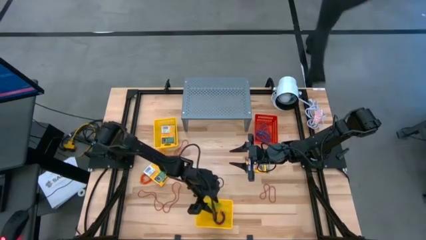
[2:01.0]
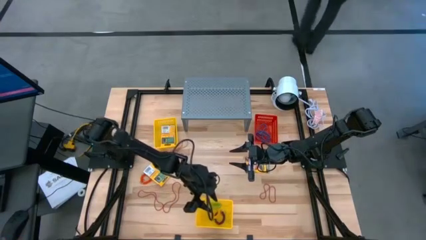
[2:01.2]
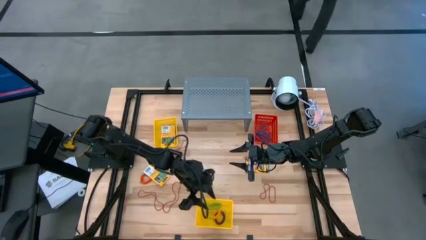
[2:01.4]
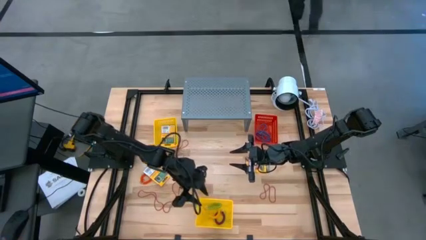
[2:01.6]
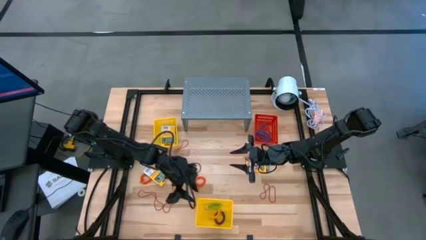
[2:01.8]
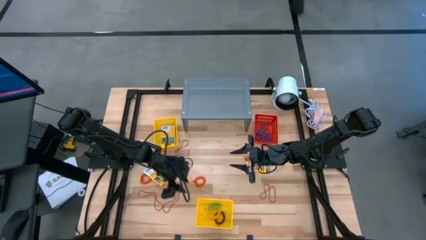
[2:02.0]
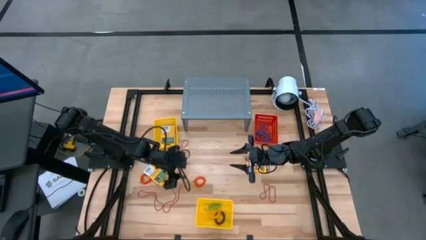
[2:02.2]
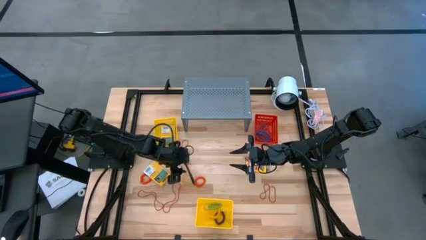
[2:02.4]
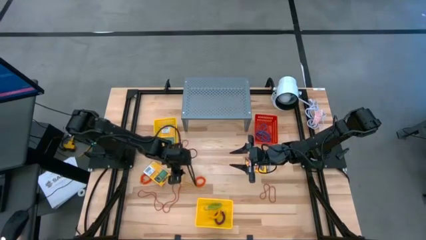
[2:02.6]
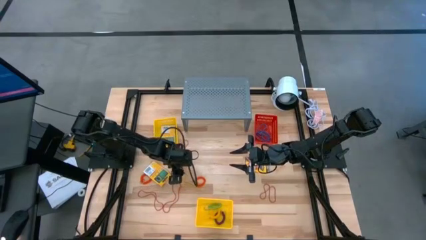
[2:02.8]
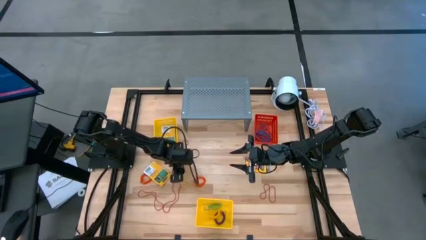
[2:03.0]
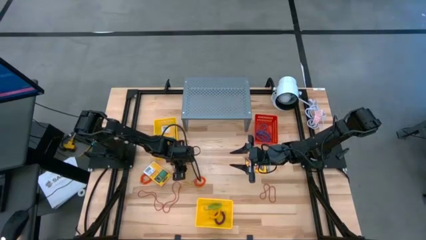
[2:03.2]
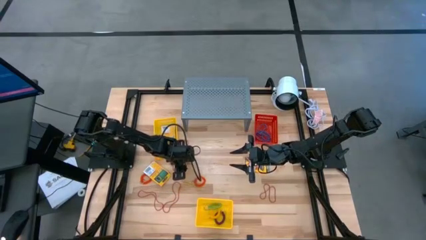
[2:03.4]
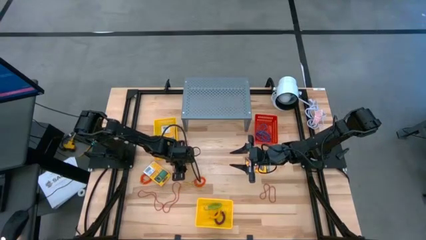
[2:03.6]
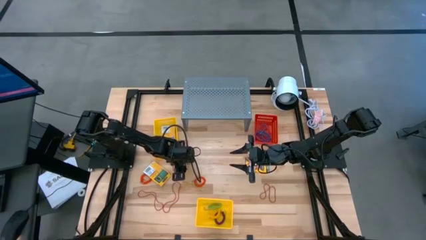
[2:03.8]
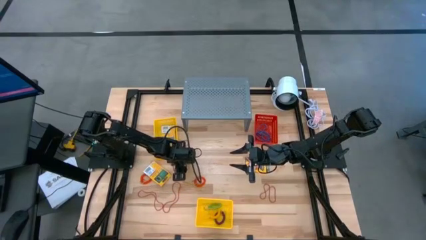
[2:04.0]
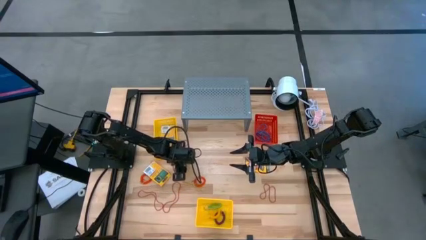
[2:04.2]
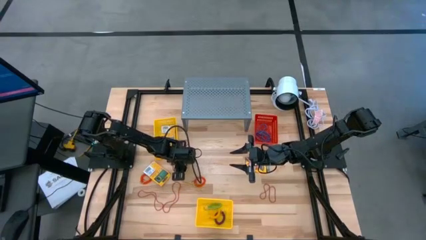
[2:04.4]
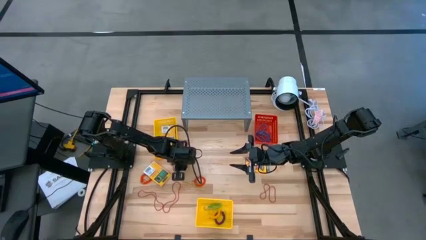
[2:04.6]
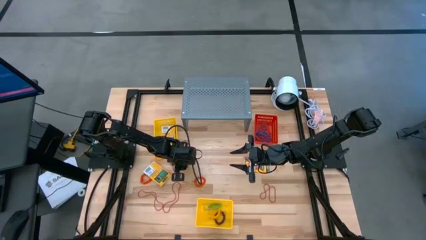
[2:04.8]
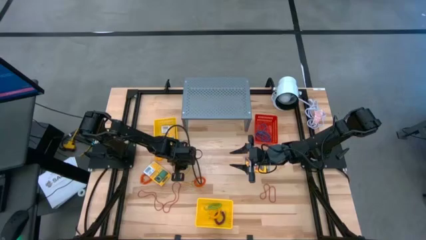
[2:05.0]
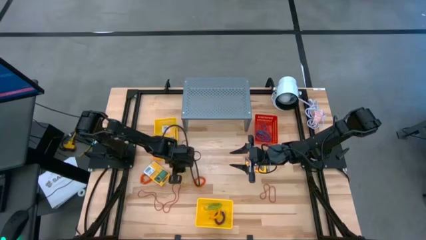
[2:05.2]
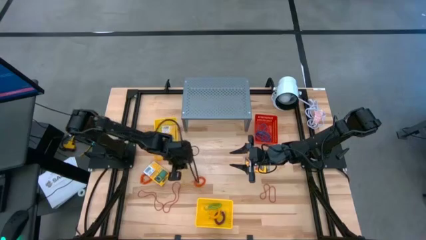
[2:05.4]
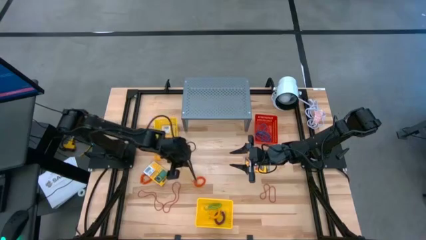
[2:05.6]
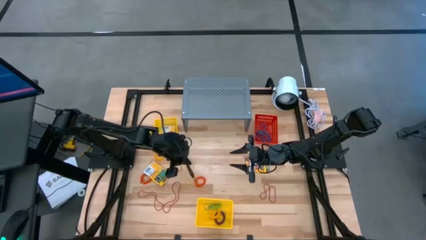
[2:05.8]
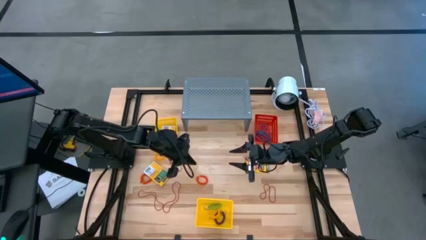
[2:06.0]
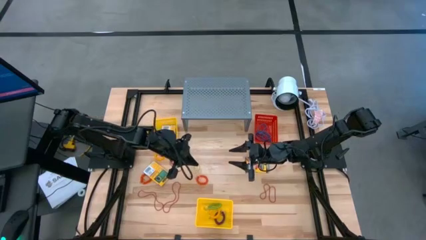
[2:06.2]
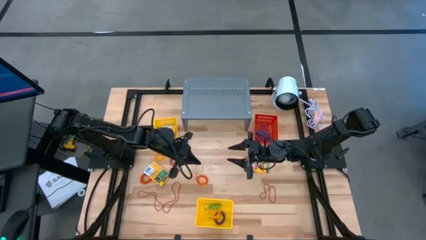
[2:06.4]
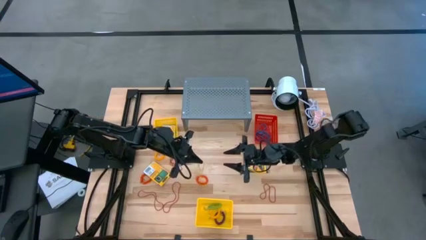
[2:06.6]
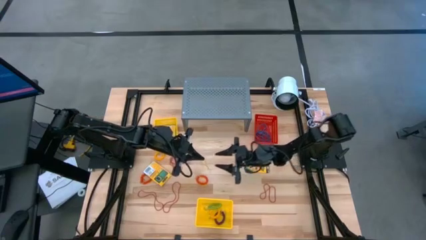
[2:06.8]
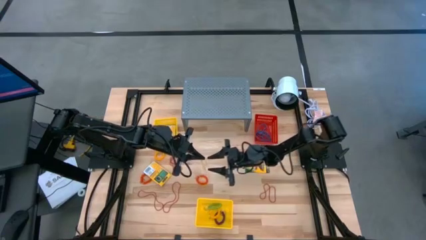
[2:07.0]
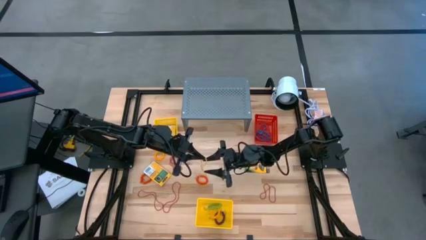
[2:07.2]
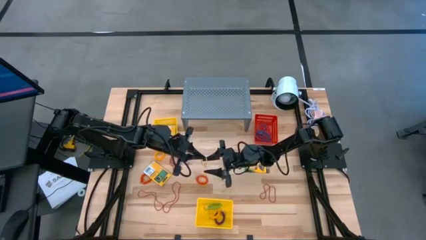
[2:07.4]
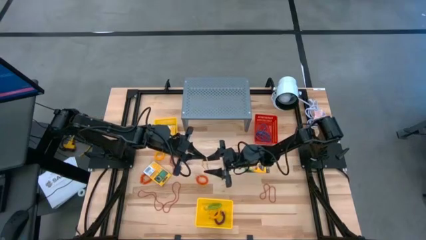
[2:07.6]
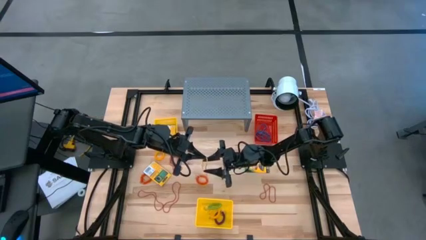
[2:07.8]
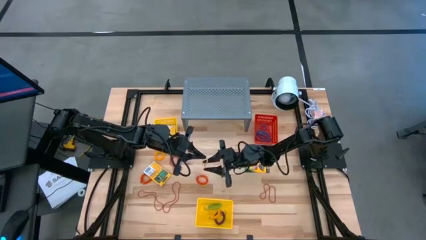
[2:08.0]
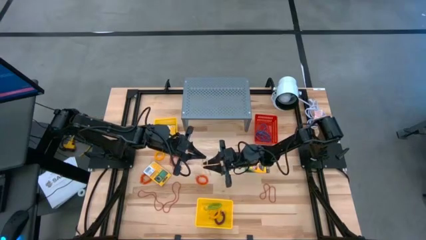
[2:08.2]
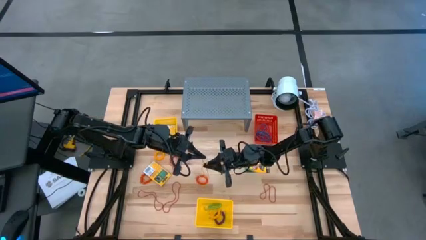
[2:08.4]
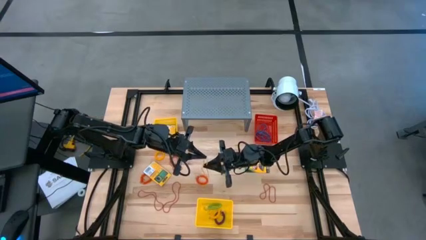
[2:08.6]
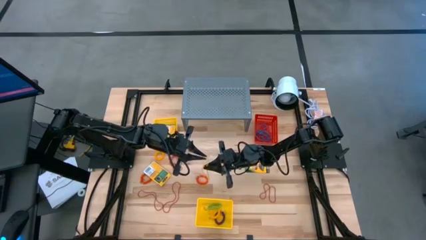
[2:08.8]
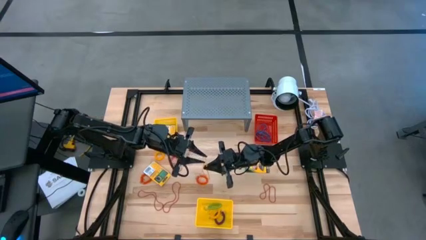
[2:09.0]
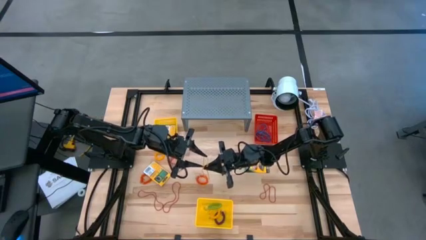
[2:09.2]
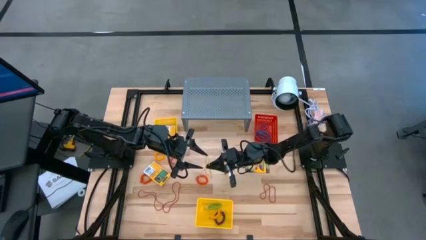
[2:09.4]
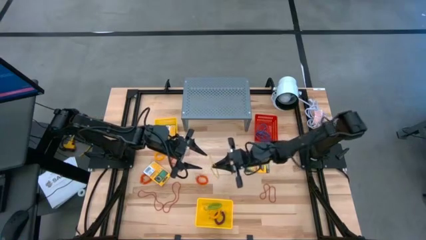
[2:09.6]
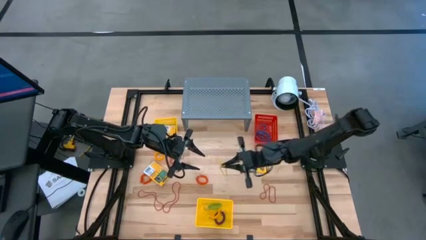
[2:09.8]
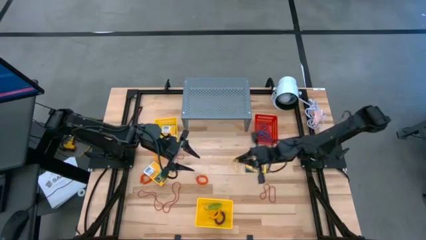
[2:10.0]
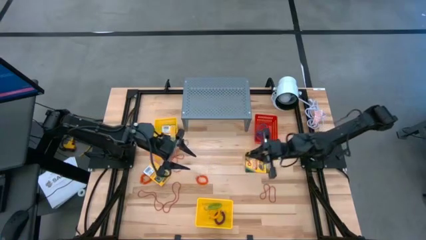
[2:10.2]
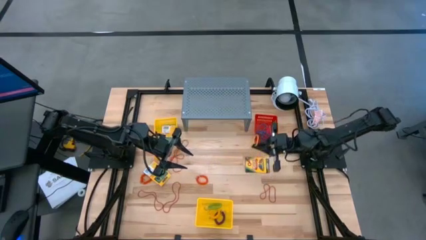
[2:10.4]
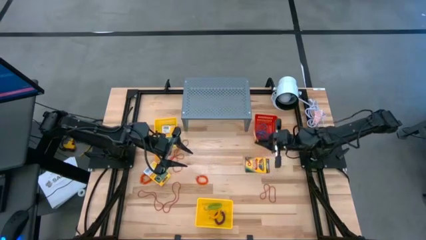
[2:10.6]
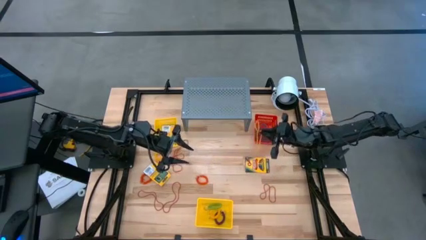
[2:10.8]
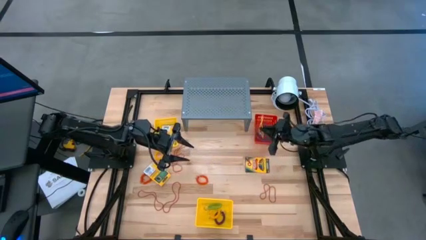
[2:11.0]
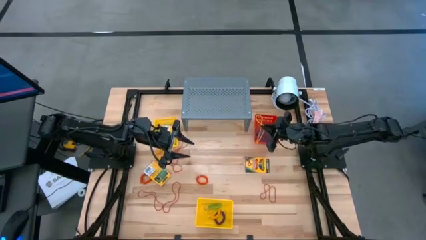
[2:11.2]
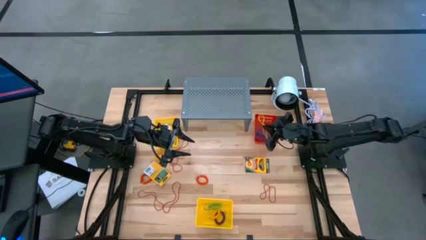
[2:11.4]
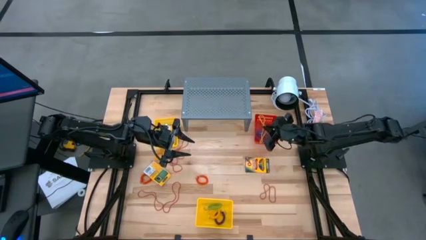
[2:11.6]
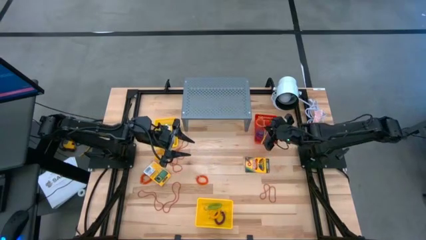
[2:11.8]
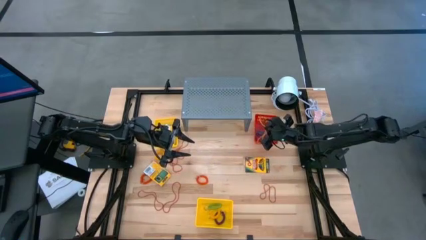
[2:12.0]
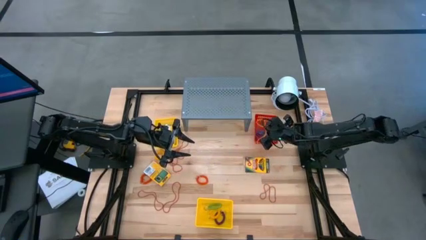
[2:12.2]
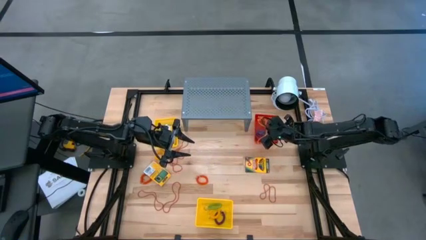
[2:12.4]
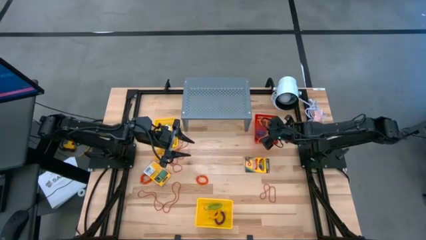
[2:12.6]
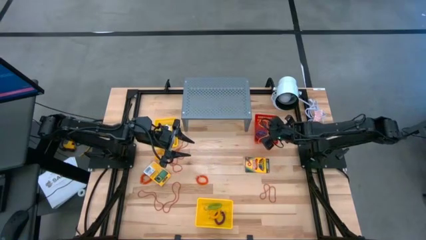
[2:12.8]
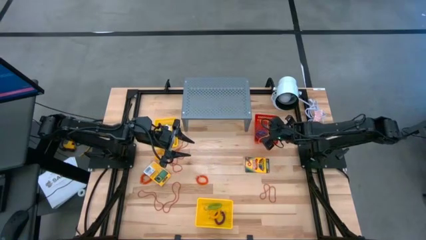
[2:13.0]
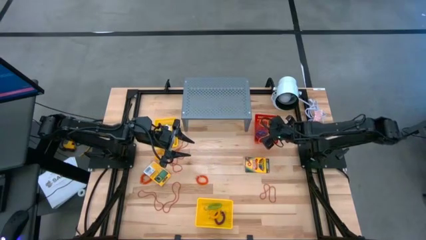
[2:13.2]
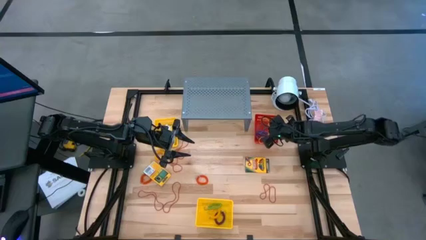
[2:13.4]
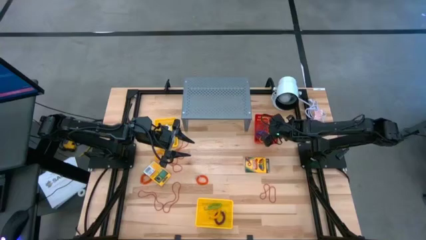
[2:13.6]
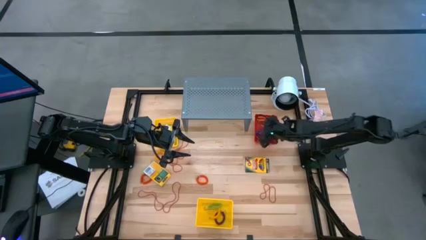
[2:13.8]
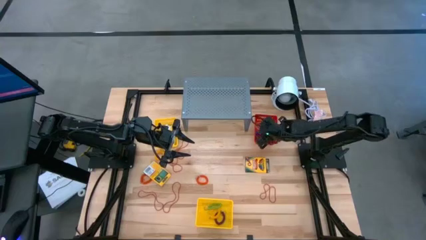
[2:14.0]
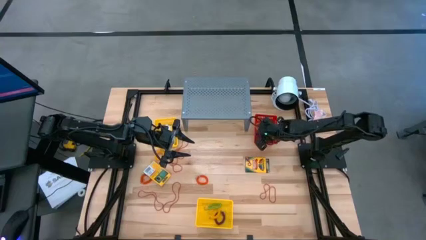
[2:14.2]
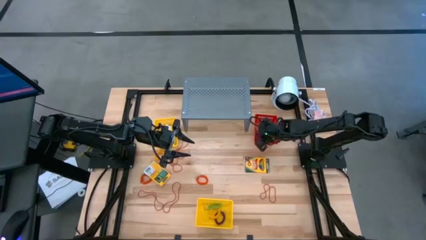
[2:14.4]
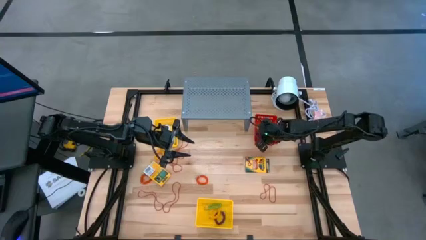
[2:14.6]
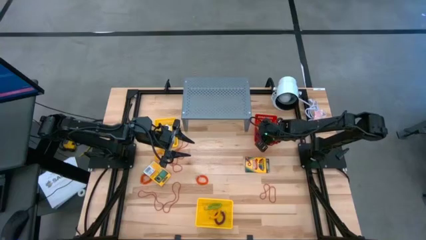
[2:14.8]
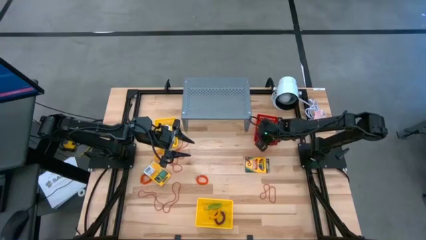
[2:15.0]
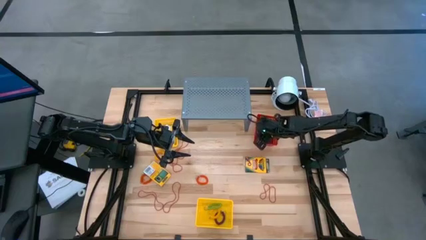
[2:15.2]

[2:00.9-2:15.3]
Task: Pick & Place Office Desk Supplies
Put the yellow rubber band into the red bin
